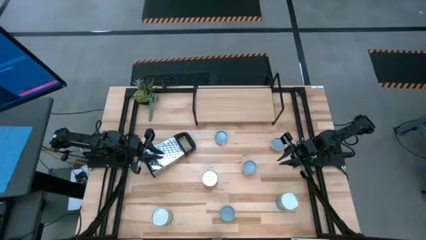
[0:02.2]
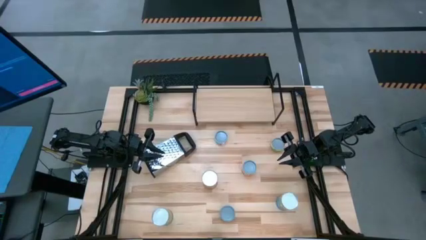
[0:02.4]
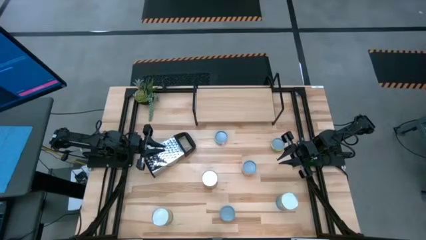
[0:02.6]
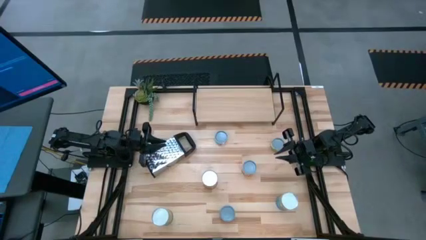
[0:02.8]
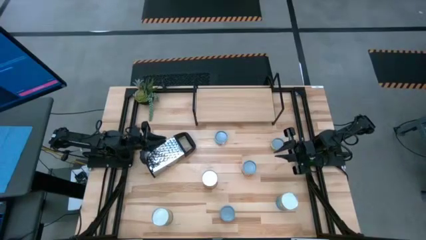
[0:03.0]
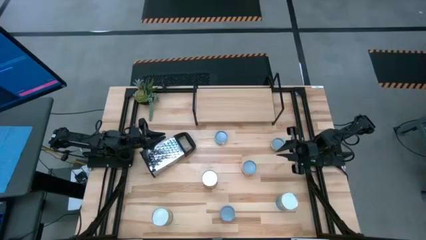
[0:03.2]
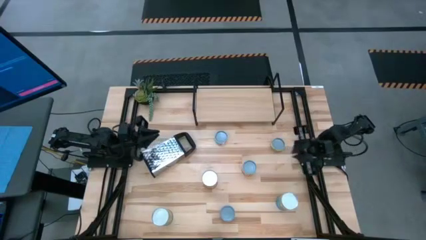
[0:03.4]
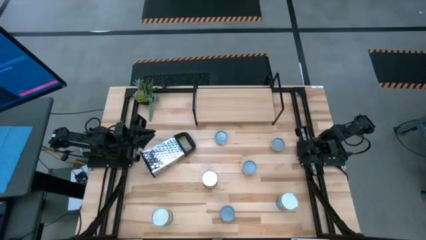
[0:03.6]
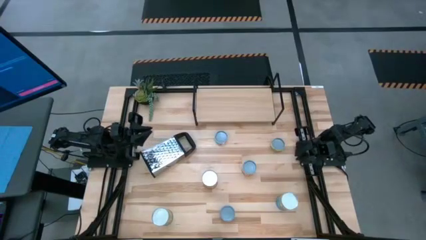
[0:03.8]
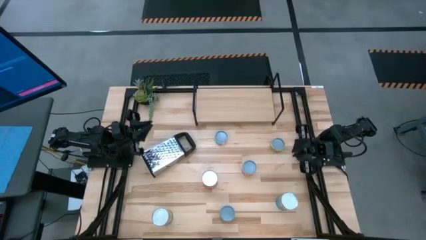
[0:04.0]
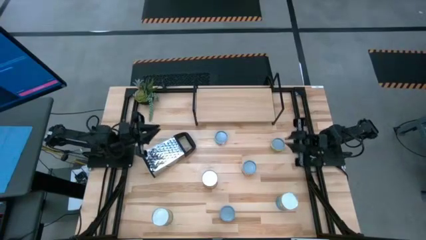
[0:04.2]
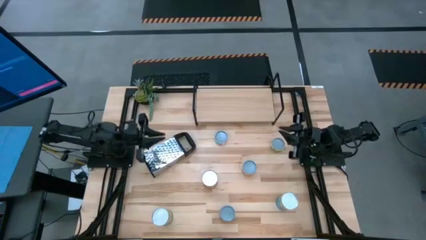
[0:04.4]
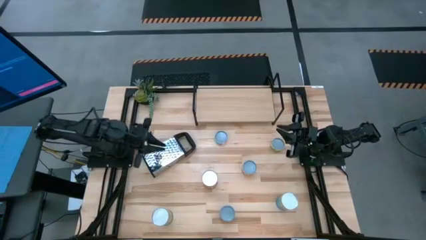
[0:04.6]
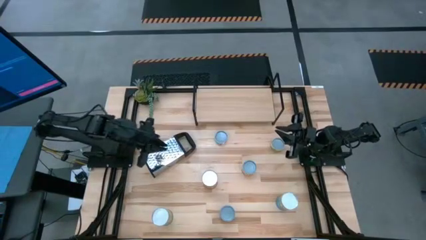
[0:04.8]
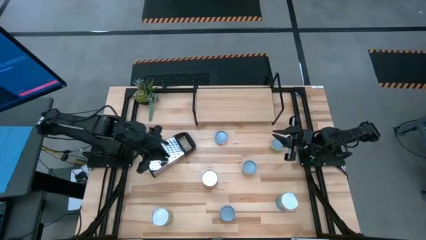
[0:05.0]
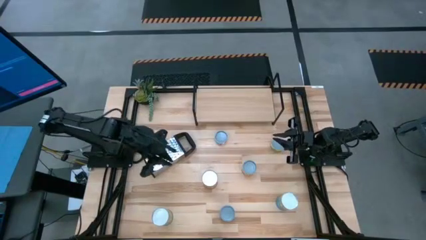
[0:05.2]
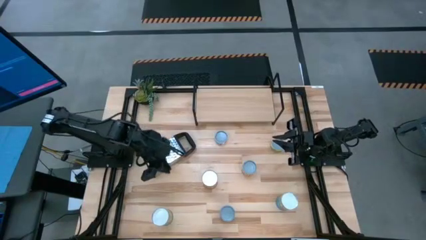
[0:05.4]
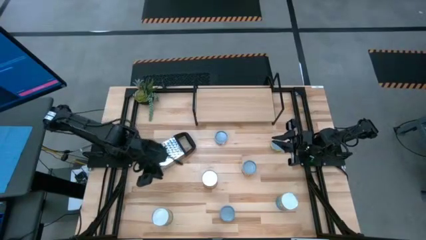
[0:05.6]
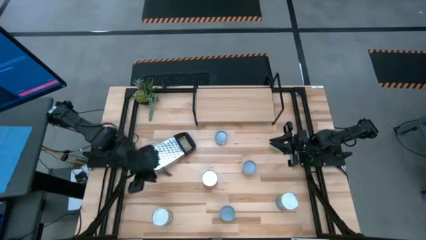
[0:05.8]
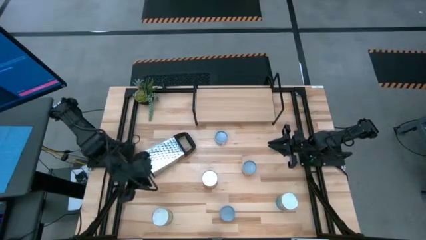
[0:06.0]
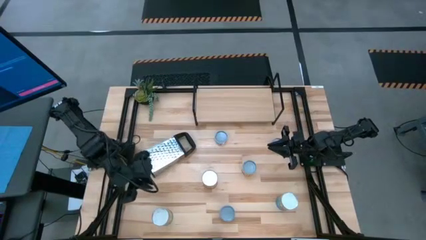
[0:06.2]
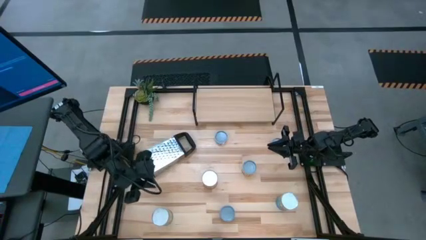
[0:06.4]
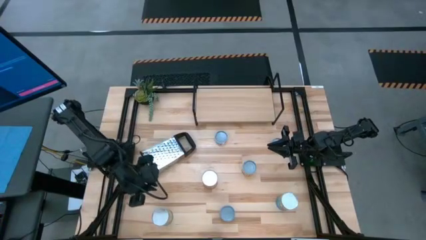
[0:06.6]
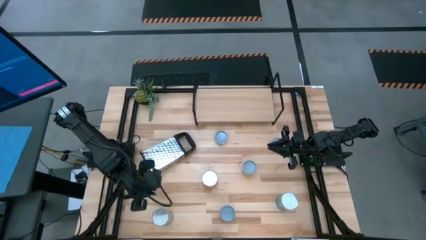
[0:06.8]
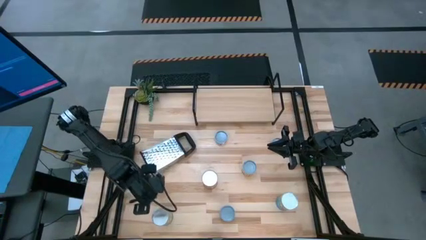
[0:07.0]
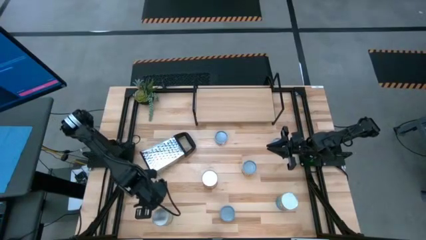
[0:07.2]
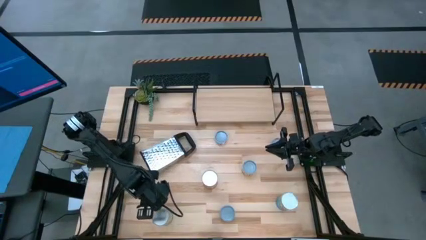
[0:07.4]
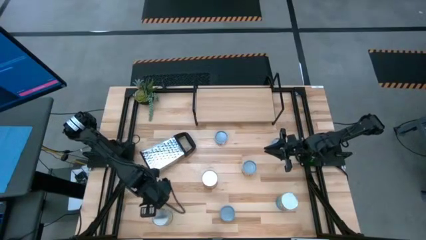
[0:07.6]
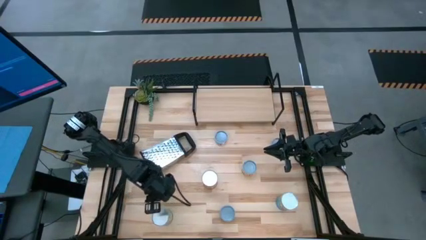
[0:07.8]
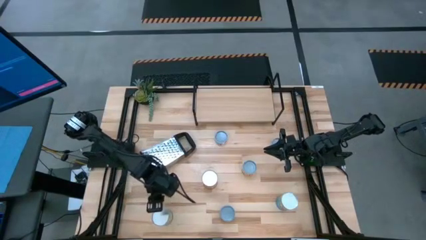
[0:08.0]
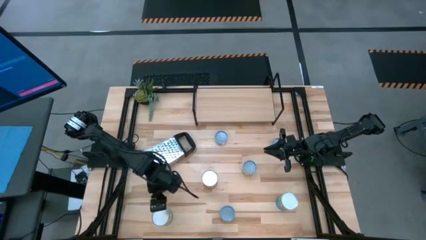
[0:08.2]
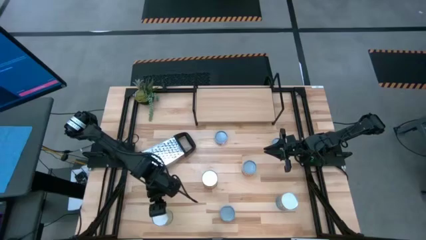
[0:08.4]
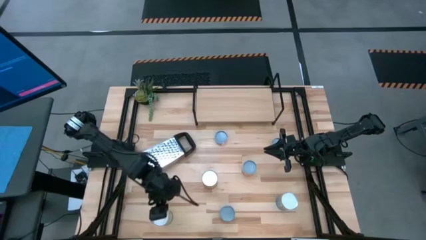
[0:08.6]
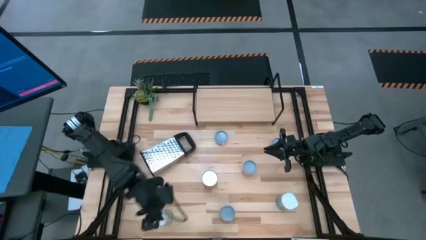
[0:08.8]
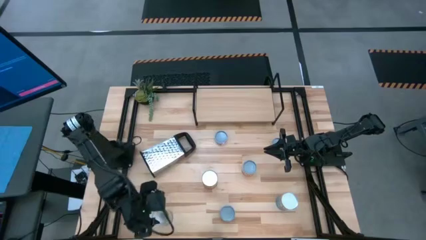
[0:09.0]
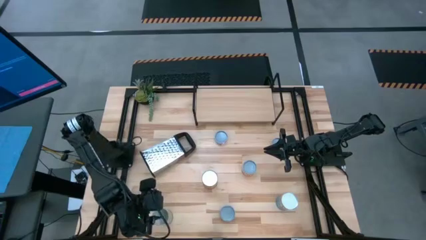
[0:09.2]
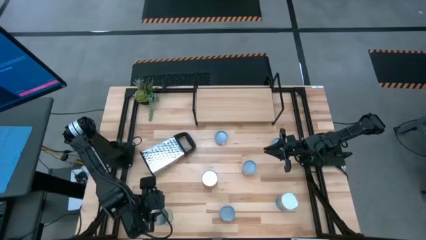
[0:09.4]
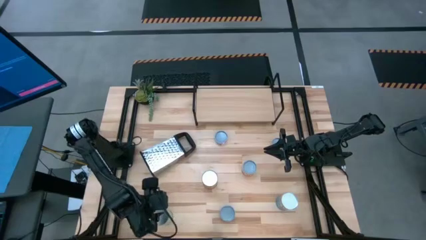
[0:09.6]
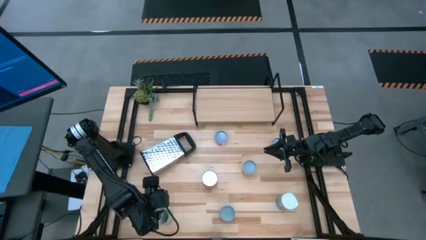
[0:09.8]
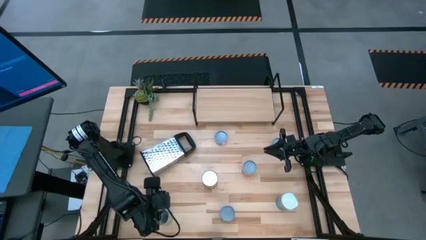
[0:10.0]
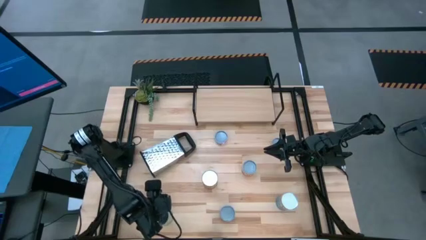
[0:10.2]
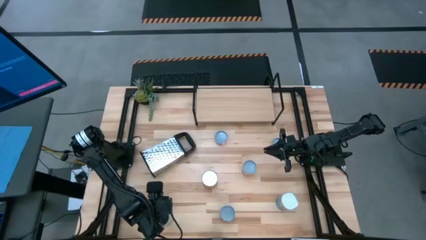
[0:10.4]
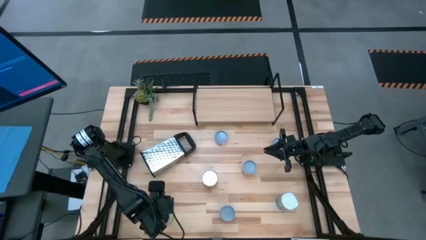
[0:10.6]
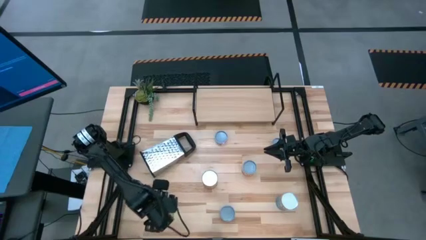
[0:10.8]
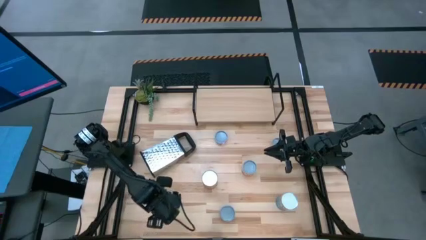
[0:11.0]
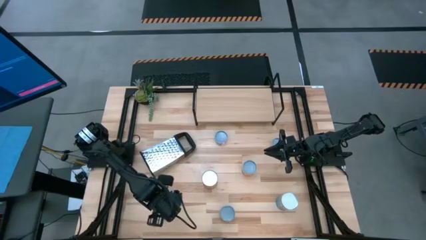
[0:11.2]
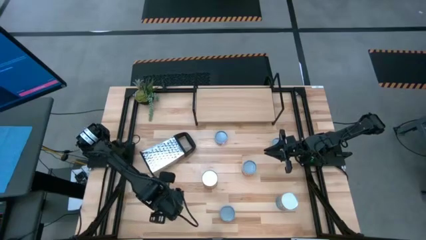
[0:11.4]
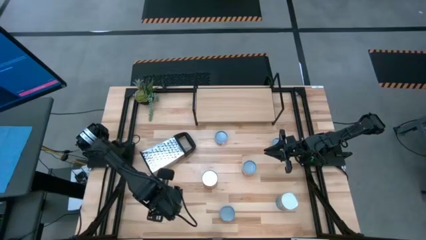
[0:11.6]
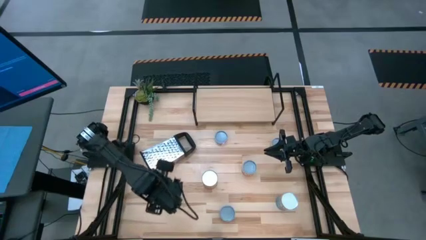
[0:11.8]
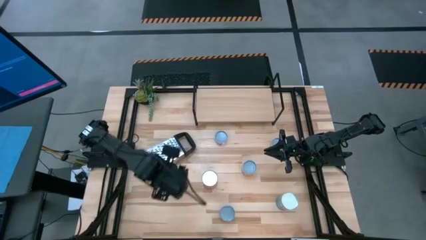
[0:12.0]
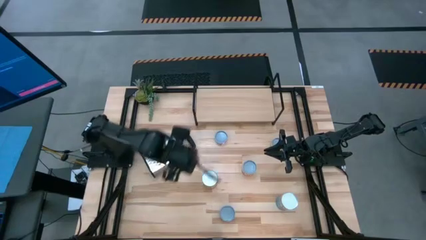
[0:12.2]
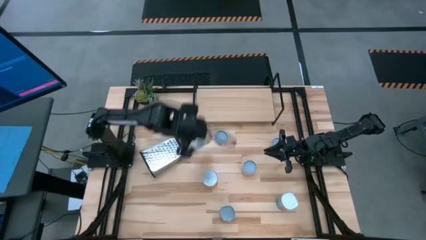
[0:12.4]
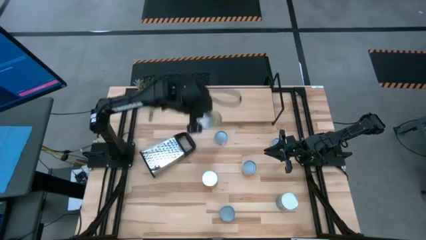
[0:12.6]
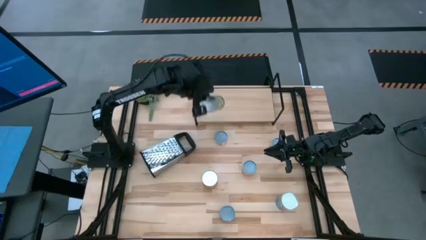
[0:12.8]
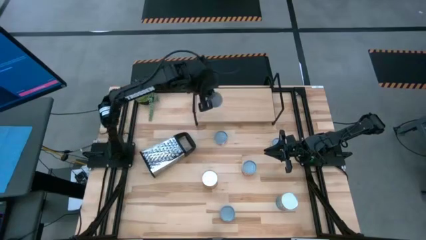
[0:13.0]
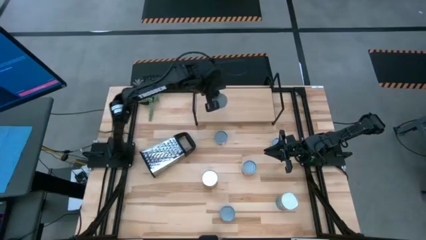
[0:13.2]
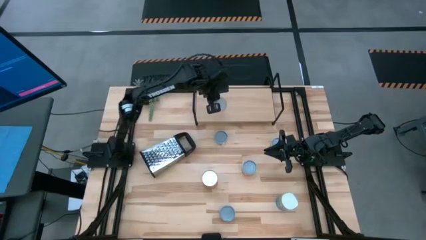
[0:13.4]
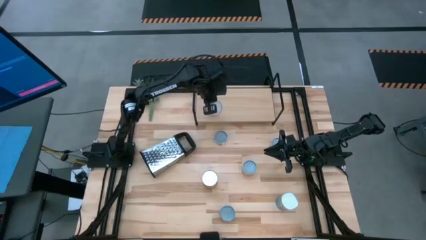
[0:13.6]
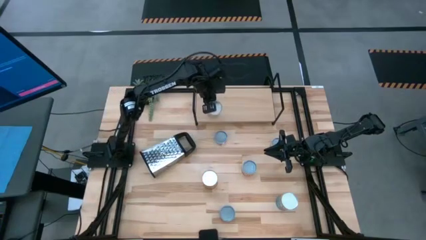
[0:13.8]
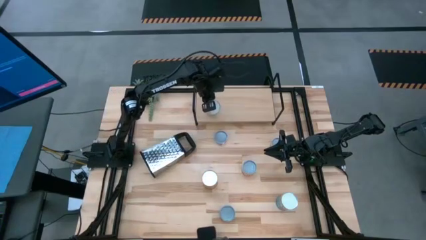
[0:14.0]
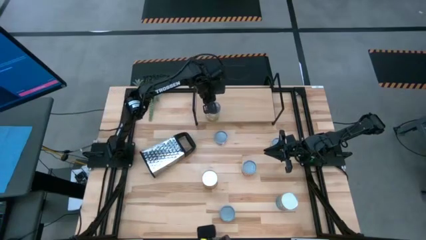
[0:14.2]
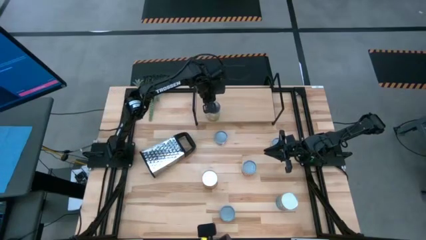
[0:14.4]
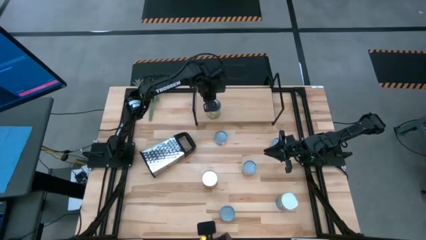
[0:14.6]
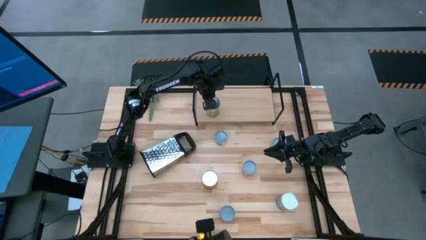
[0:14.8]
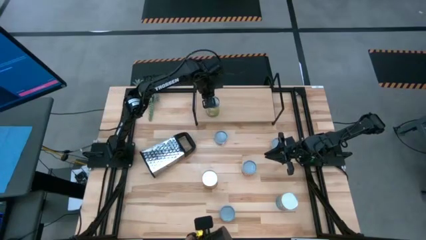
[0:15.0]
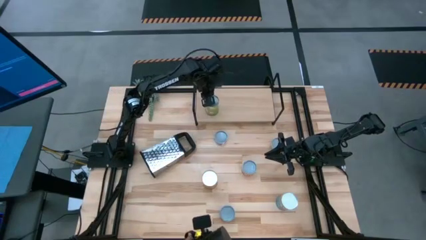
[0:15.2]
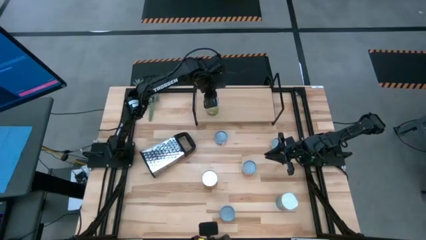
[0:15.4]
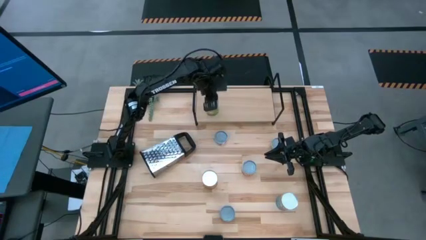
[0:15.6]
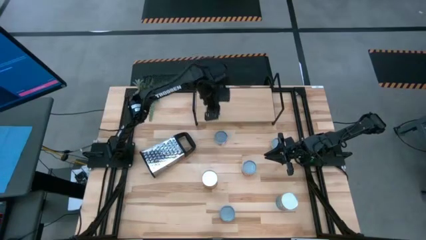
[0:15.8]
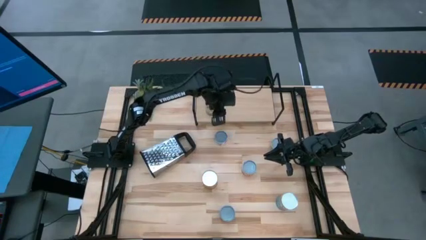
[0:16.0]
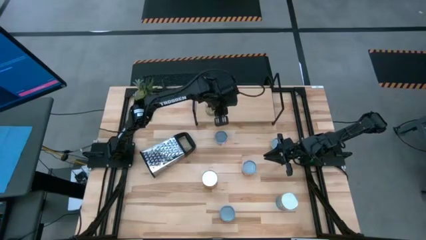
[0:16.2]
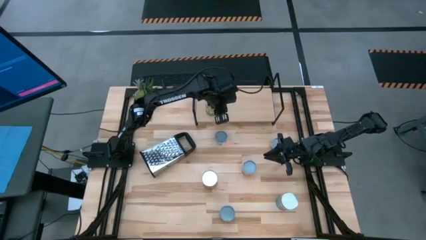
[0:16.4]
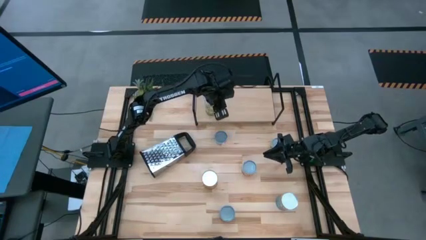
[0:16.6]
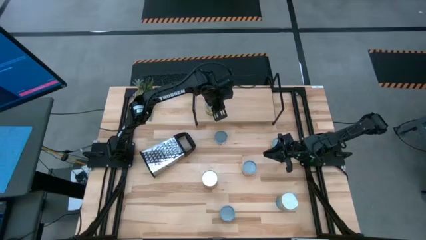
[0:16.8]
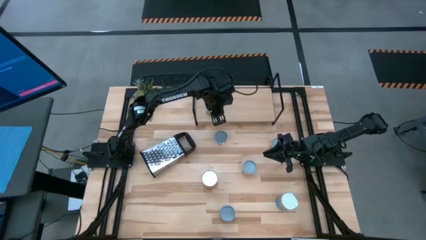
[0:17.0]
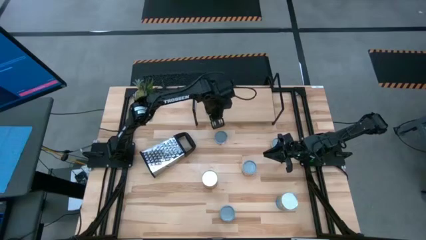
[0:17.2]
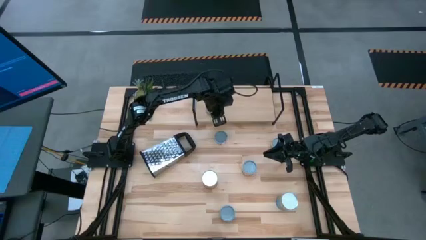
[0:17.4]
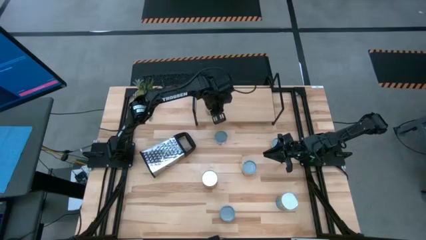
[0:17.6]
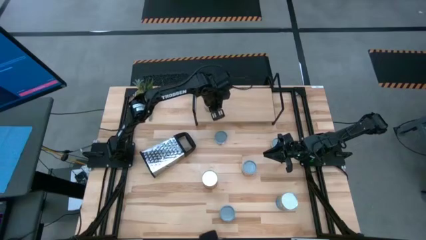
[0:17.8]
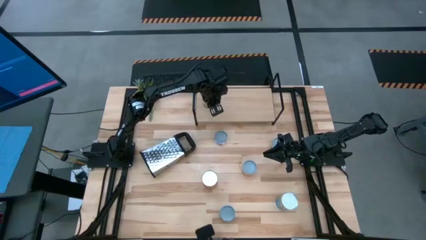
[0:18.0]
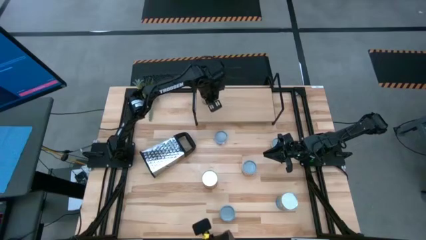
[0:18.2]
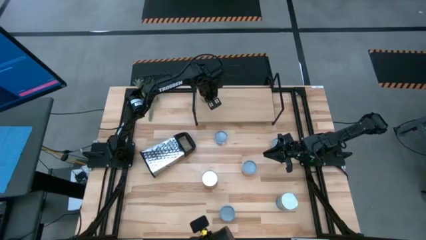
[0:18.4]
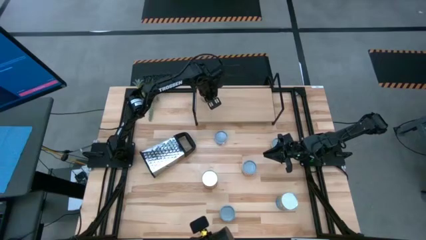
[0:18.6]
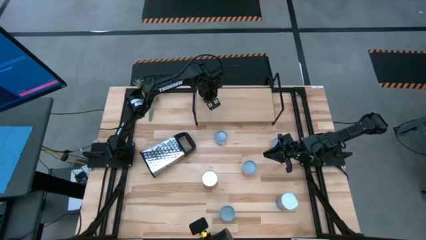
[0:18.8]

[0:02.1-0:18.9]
Task: Pick and place cans onto a shelf
Put the canned pears on the shelf
